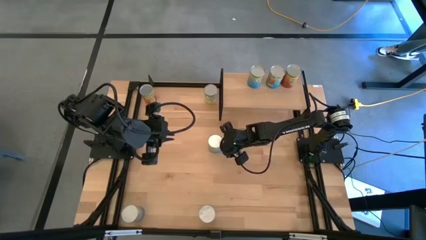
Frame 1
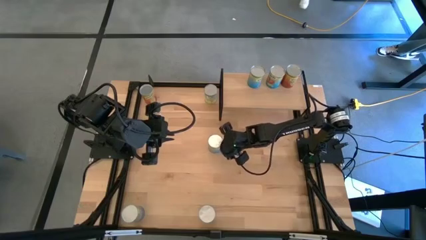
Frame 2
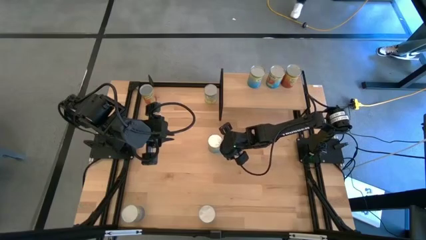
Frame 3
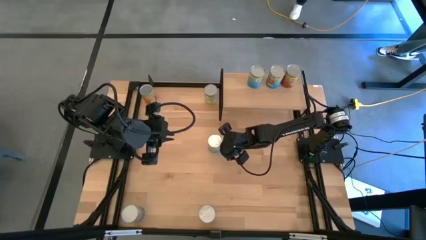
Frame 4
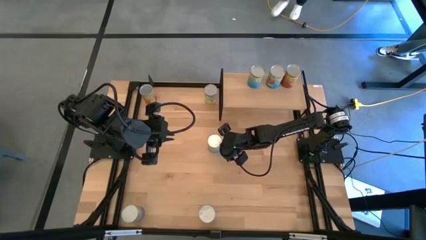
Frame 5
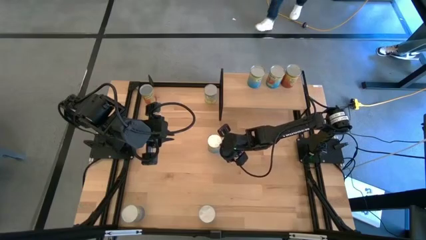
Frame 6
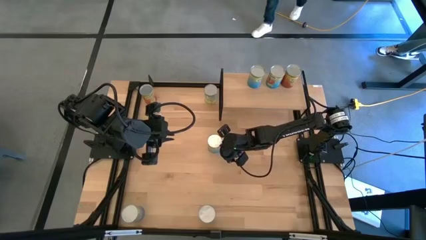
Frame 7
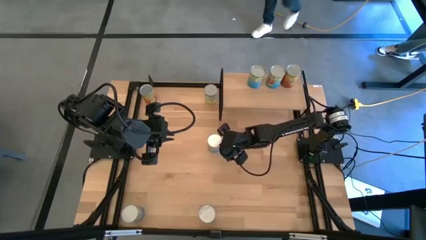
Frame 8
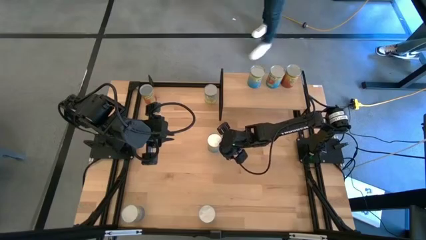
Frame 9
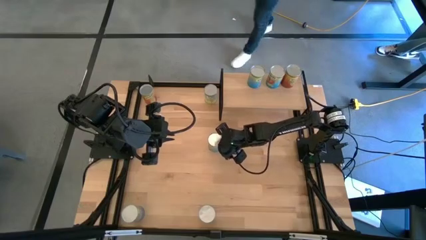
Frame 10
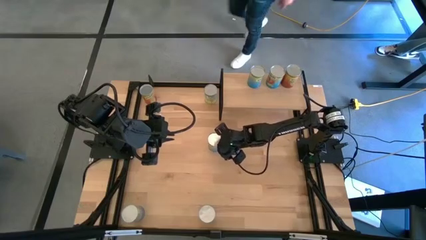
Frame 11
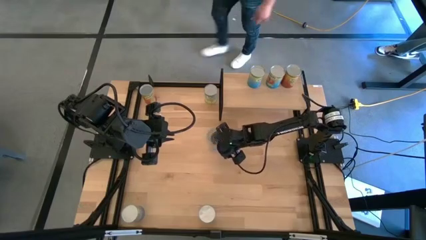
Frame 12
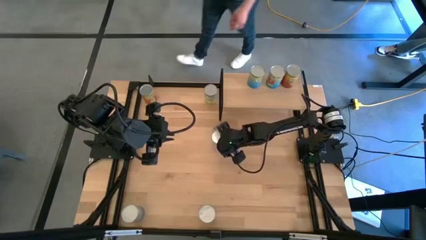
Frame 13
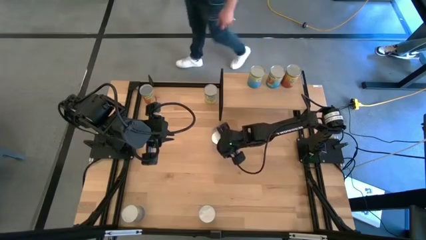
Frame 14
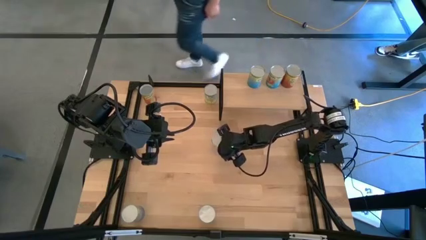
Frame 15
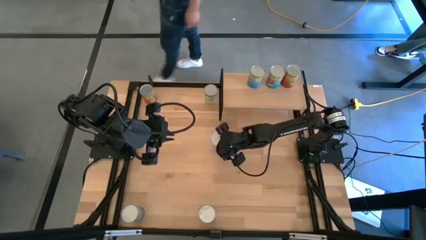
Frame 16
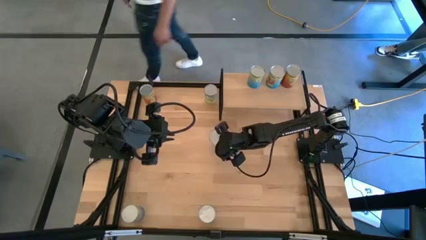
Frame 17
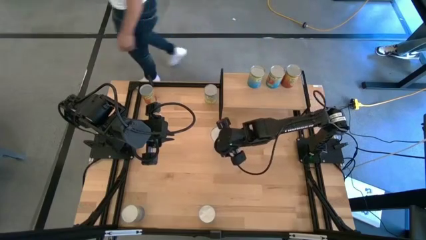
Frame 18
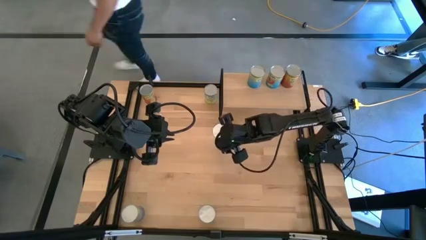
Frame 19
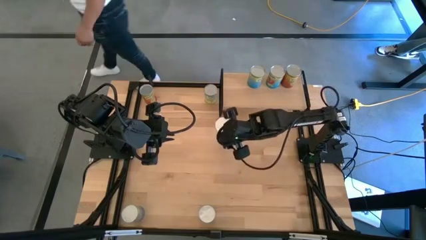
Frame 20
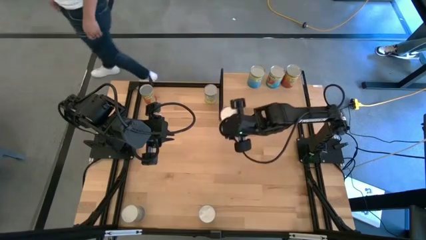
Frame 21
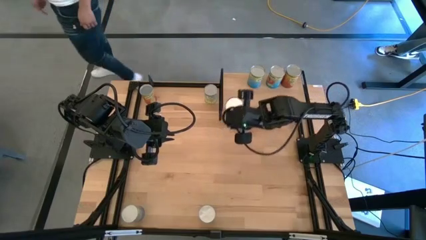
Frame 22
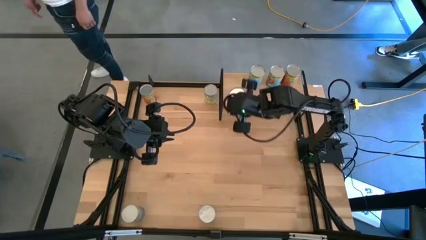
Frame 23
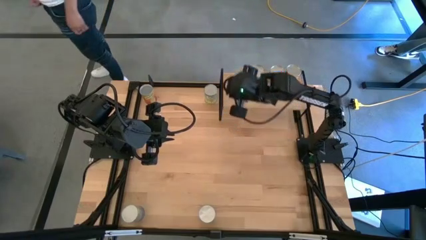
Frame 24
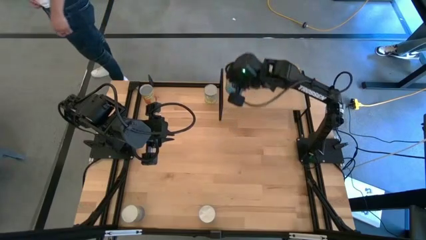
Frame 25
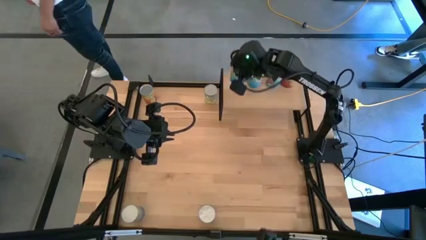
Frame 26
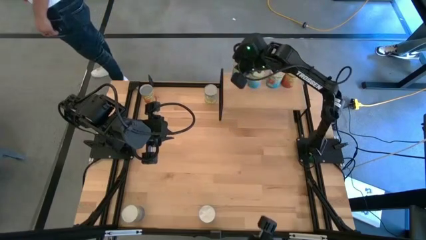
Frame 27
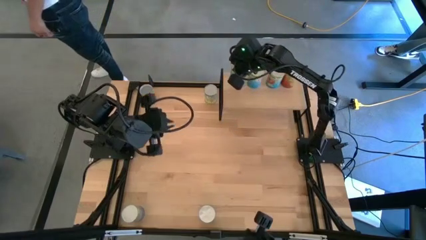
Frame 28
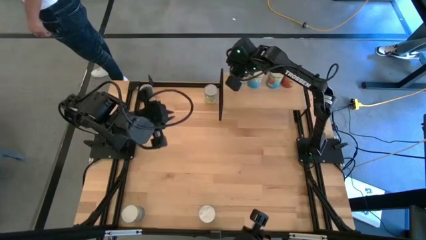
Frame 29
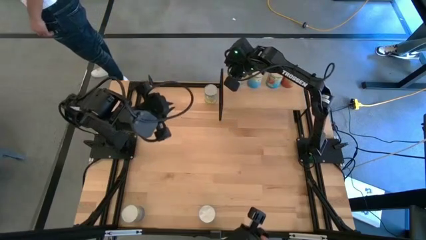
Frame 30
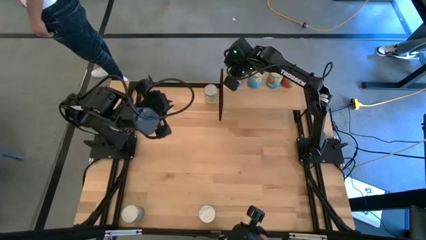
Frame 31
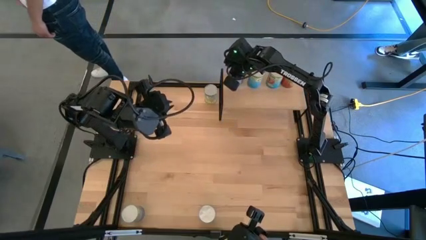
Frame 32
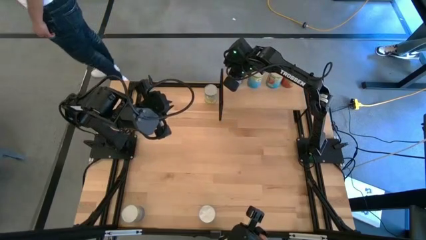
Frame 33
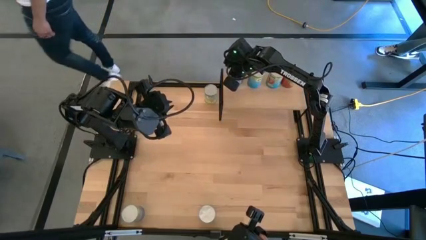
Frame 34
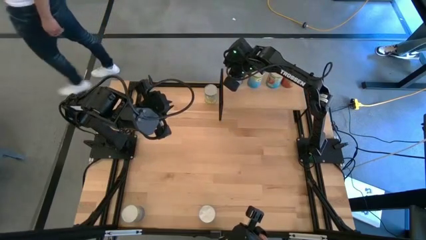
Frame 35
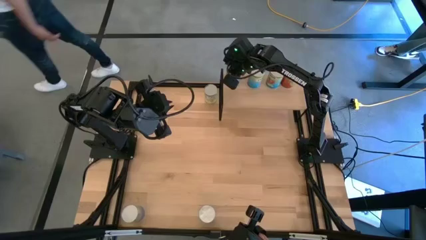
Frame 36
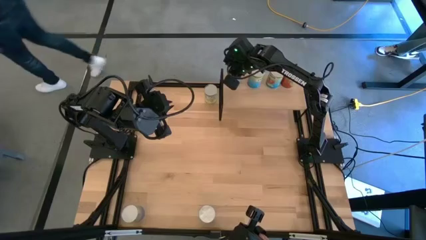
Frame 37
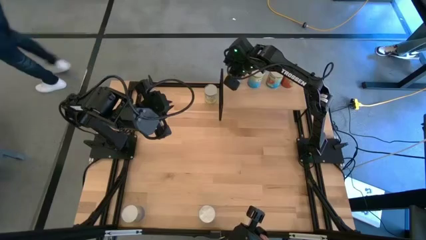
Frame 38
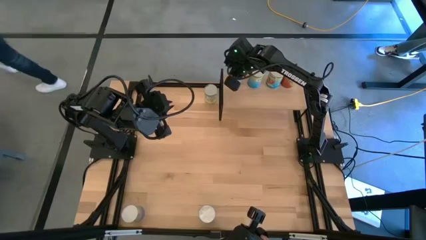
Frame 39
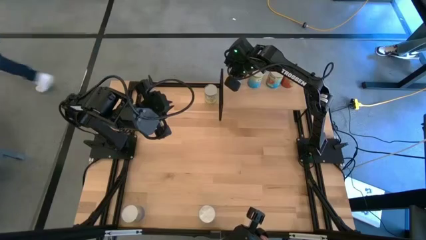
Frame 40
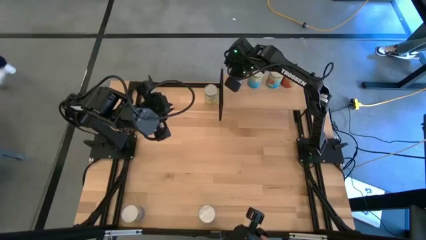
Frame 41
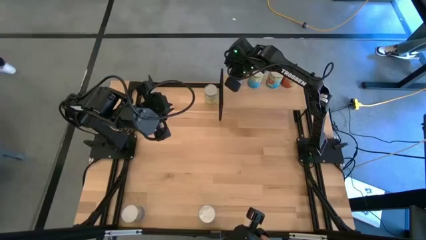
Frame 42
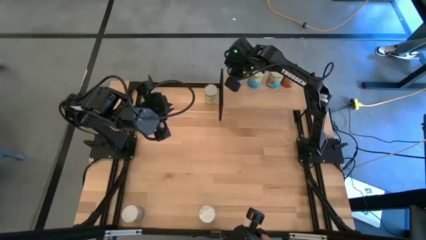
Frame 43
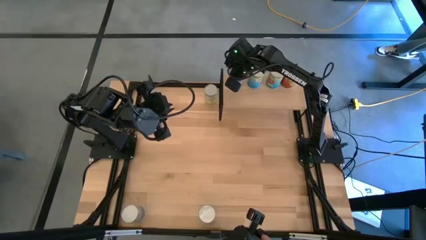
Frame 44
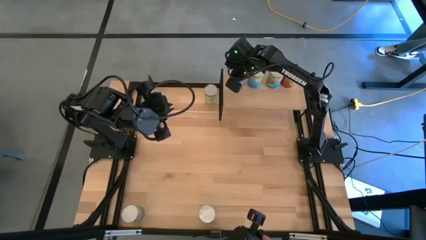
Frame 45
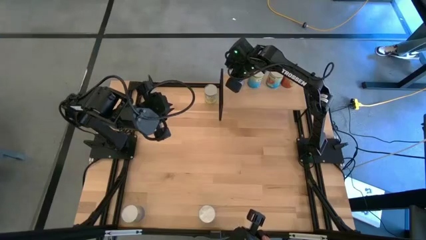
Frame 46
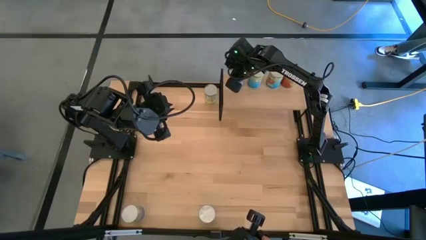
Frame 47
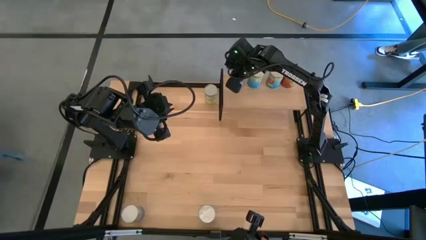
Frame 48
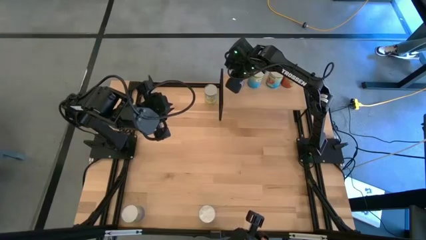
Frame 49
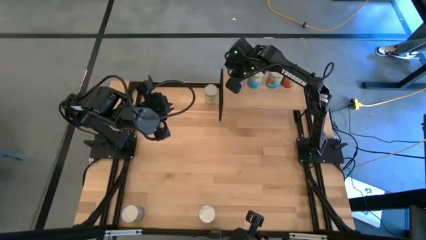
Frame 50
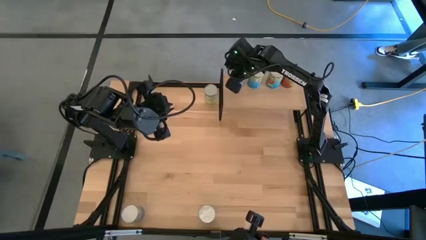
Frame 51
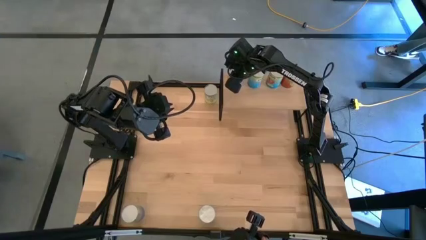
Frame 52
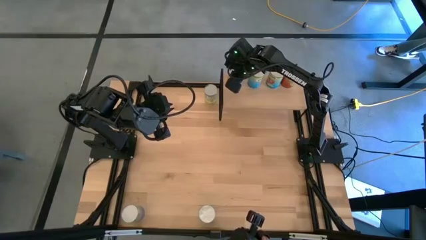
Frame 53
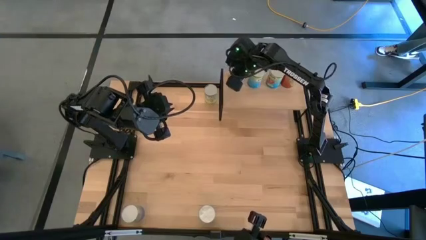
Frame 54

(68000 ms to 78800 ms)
Task: Pick and place cans onto a shelf
Put the canned cherries on the shelf

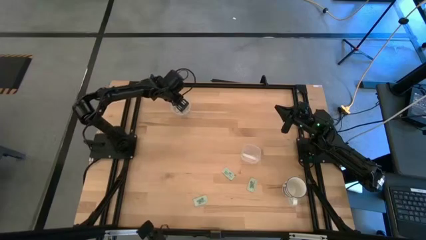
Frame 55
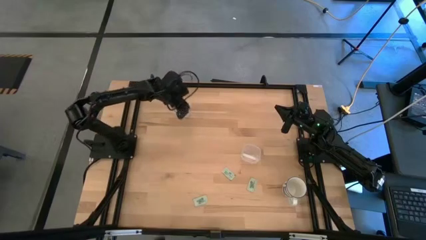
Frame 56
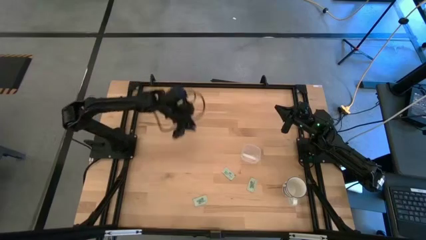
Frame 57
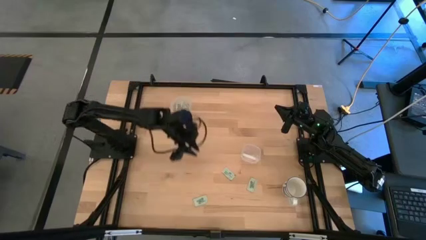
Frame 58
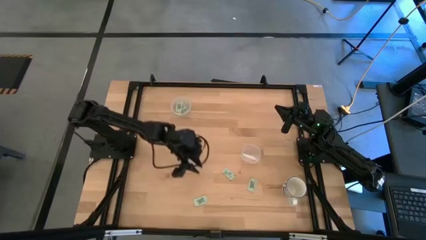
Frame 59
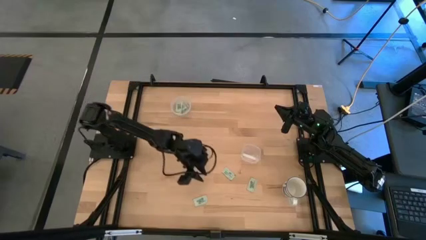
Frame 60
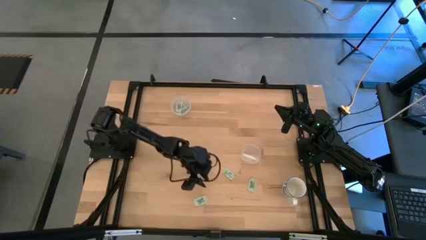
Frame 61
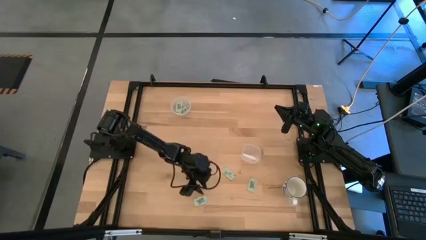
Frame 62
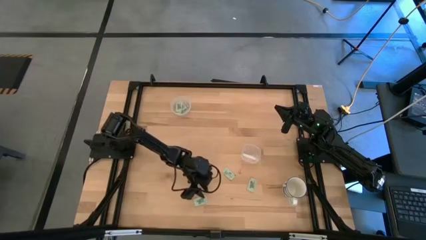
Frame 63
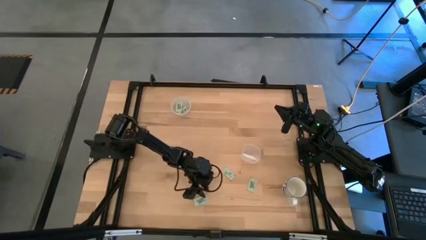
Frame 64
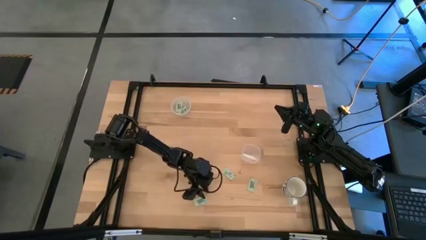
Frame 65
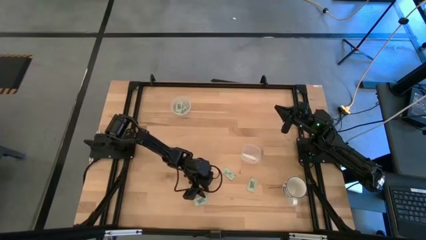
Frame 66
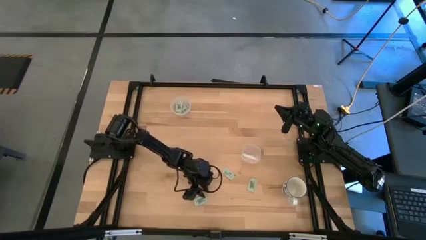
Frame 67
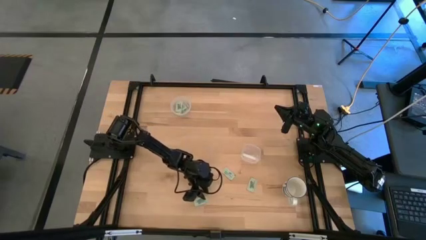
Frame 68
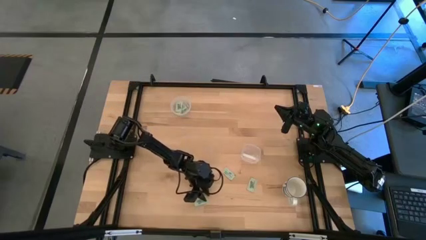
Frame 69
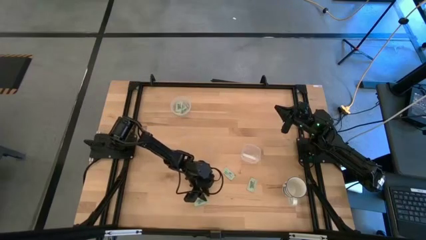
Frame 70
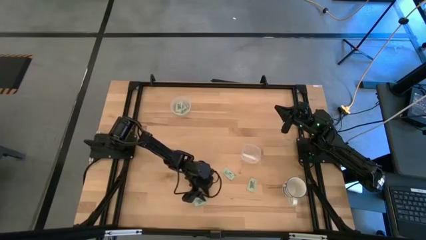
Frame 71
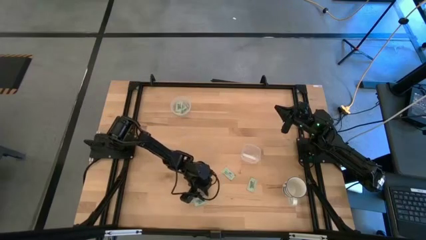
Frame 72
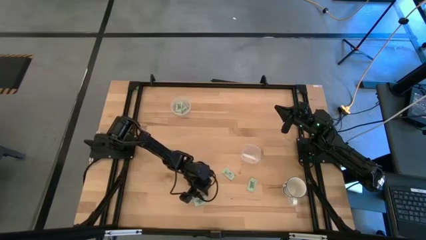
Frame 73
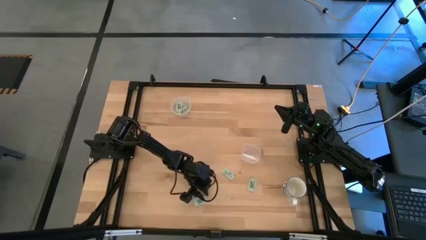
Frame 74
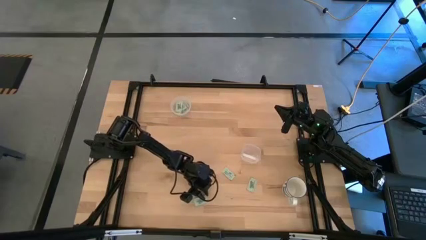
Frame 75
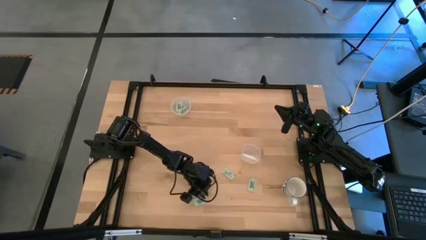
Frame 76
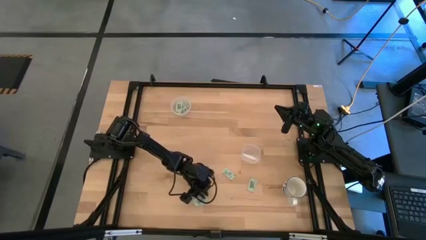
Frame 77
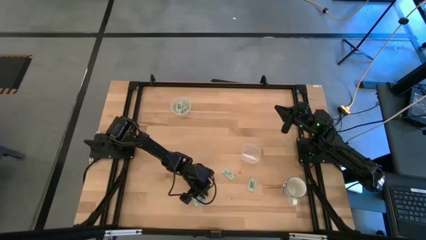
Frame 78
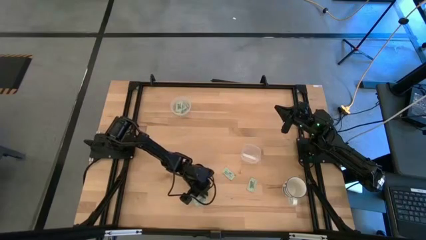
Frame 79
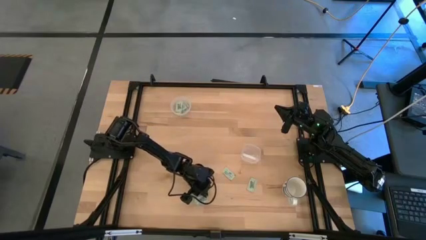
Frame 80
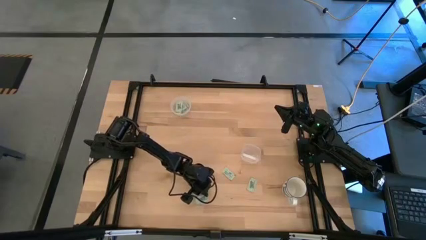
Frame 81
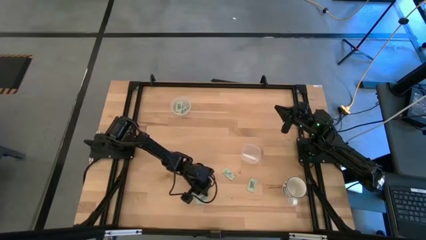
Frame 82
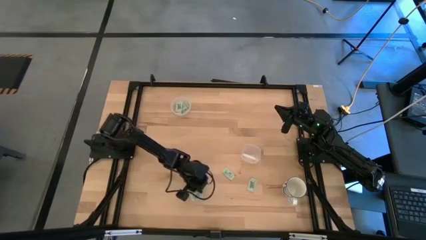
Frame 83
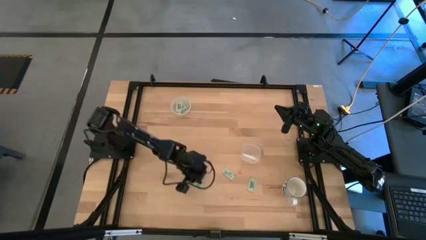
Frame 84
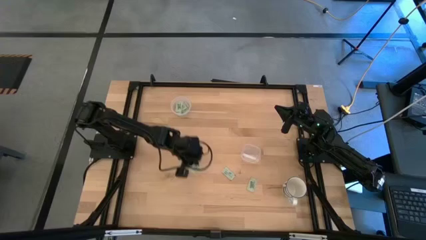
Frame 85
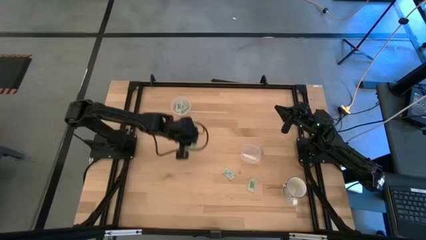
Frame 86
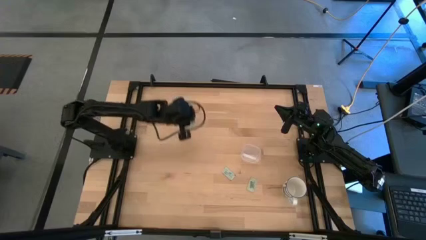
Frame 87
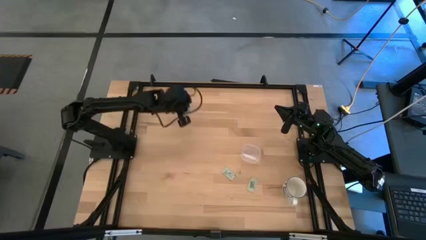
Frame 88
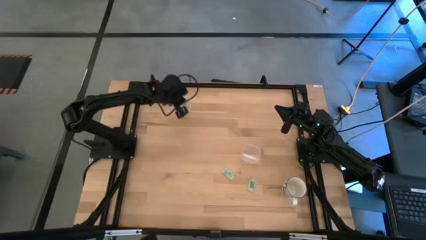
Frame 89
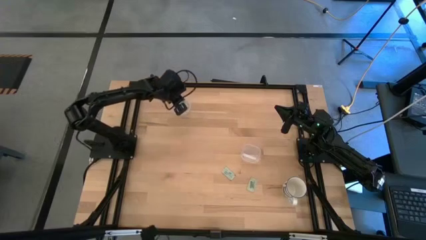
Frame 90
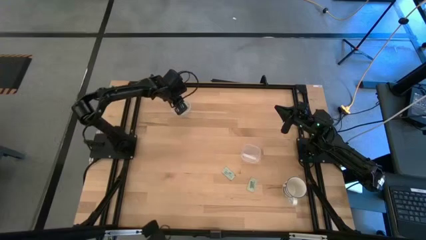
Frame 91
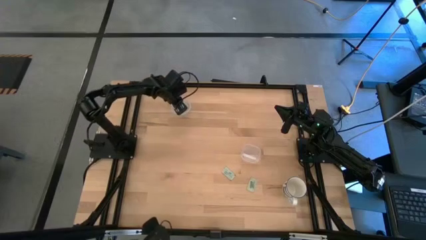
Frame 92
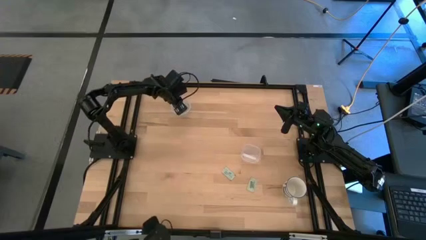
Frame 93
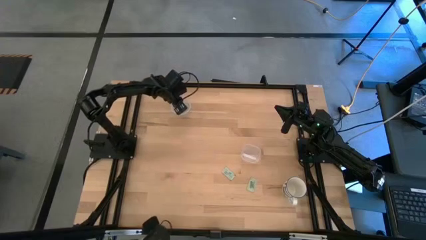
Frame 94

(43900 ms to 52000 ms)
Task: Pick and place Stevia / Truvia into bins
Put the stevia packet into the top transparent container
